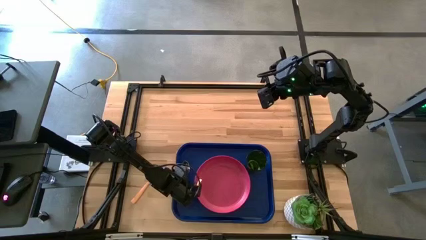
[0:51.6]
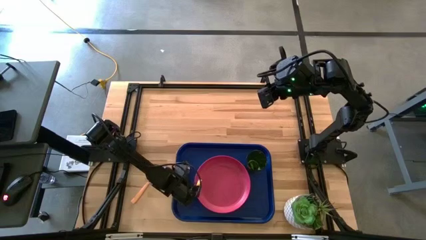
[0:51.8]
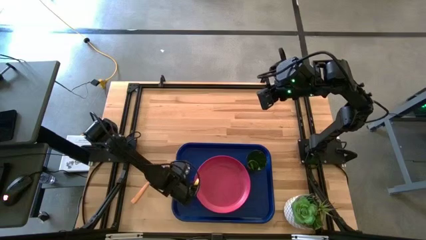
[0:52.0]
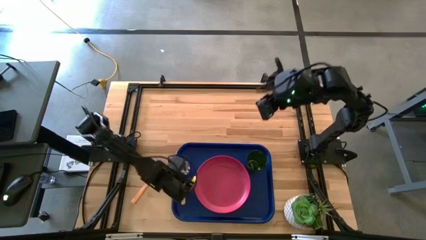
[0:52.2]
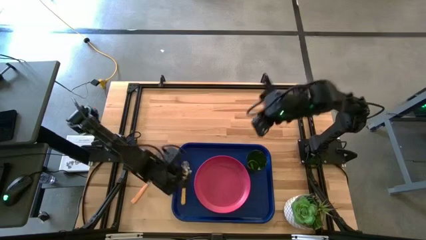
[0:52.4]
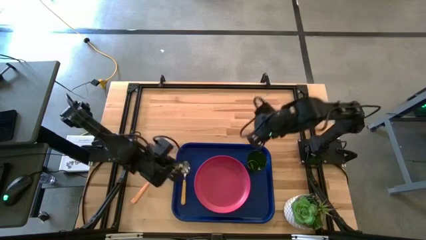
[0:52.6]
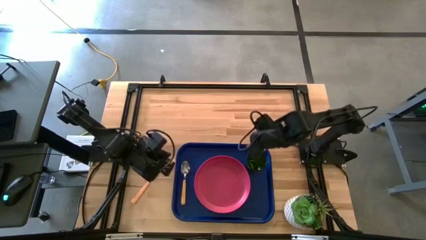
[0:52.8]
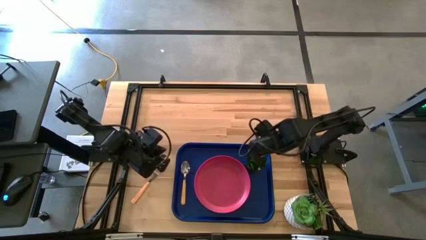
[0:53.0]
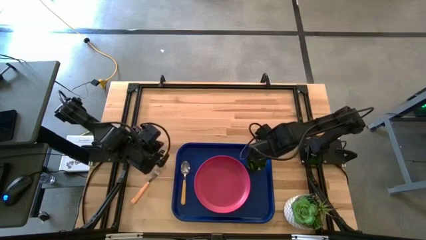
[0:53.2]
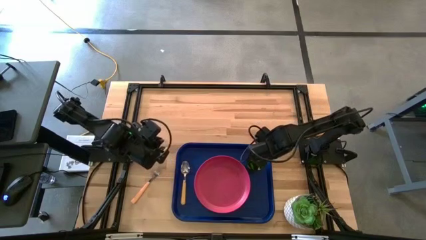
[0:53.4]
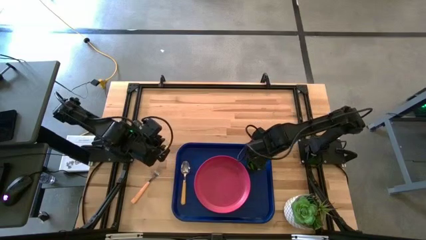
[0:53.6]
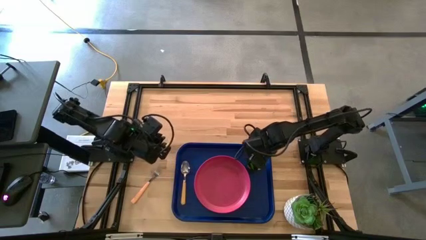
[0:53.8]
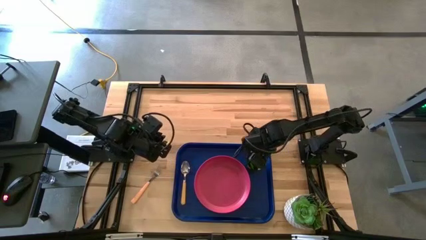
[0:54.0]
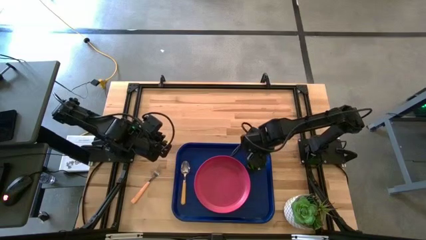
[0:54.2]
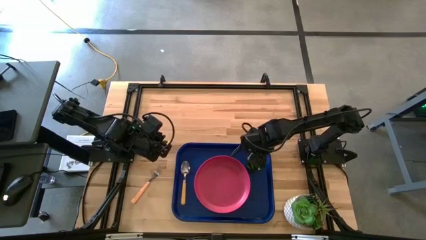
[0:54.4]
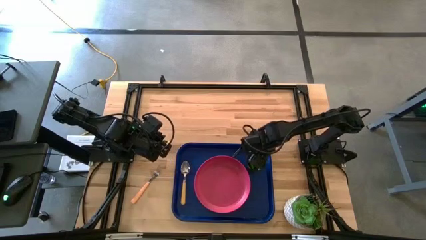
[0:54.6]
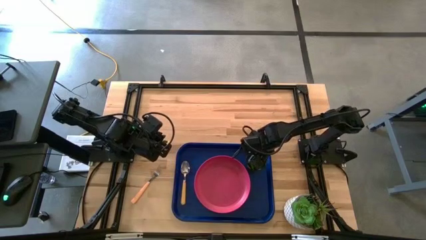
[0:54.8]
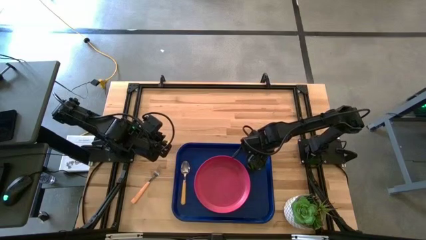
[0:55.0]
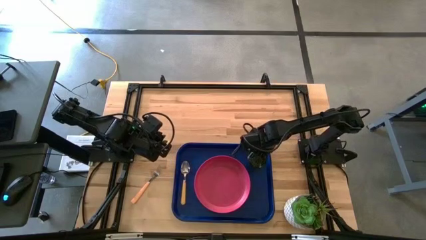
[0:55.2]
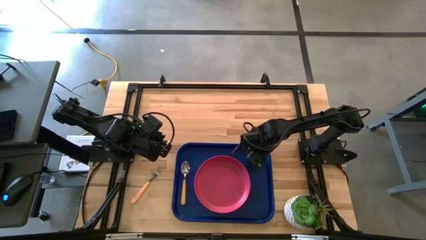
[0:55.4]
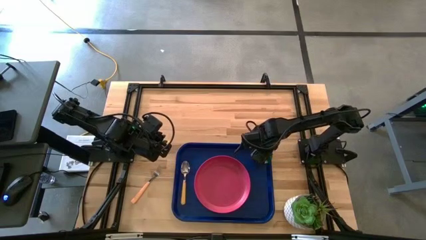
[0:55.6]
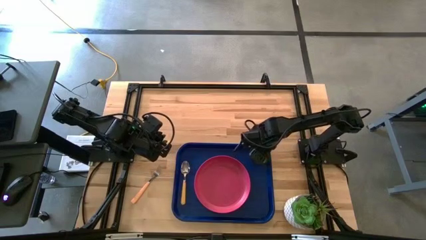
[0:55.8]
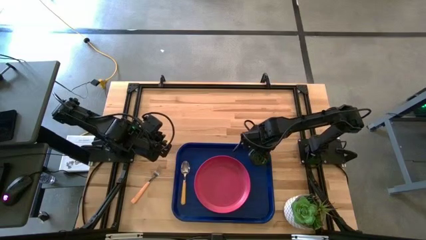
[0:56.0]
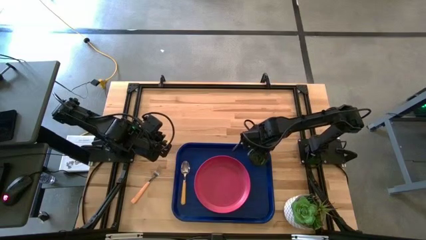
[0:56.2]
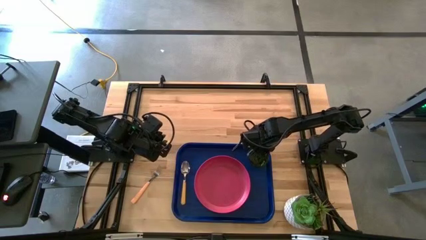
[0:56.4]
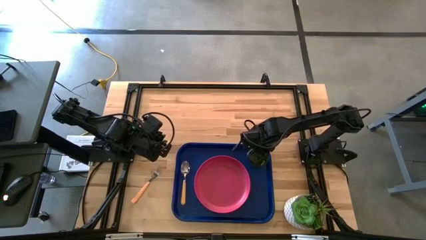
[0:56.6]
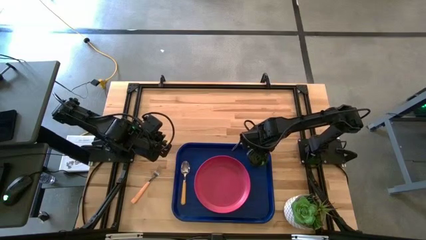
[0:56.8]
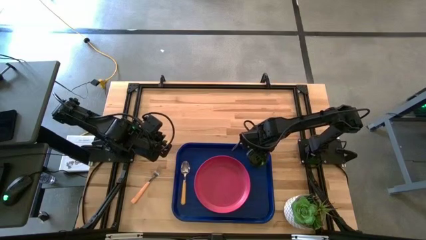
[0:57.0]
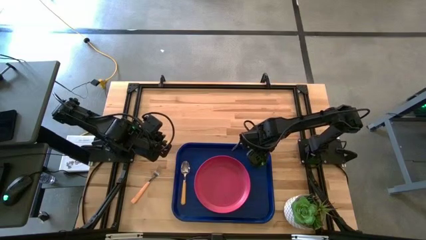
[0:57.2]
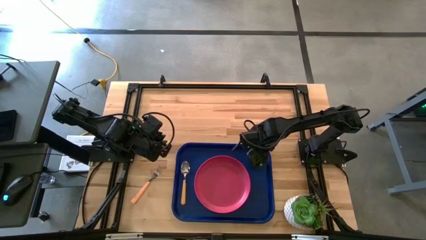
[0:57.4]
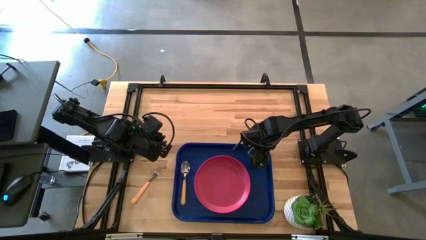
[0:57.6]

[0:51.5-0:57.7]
Task: Pick and place plate/cup/fork/spoon on tray
Adjust the green cup on the blue tray

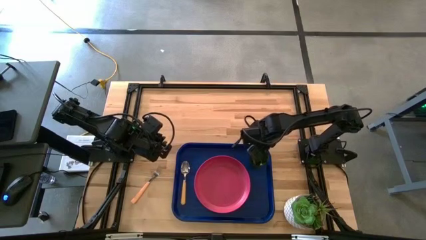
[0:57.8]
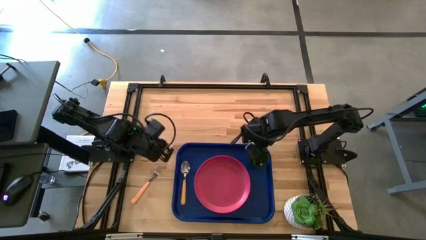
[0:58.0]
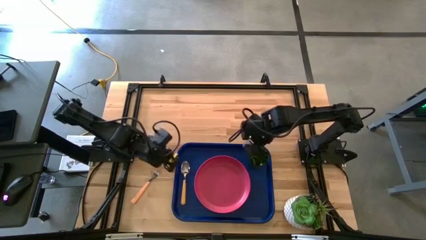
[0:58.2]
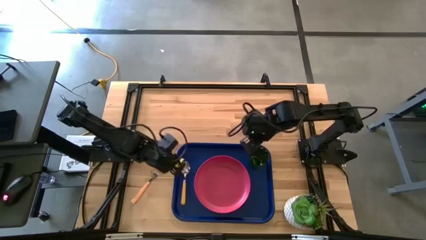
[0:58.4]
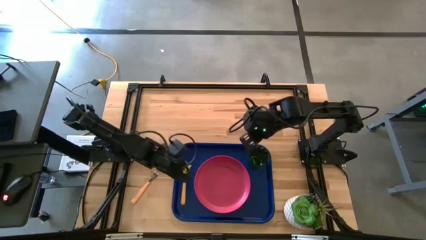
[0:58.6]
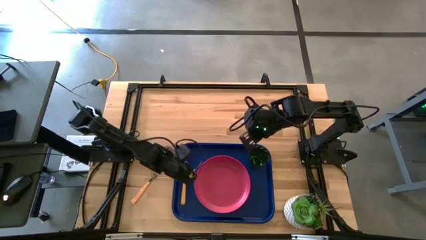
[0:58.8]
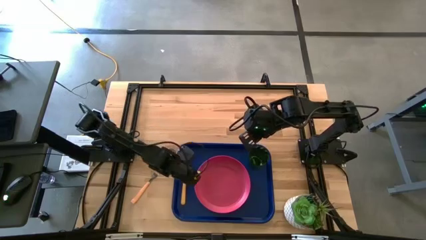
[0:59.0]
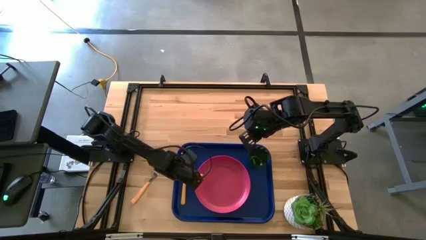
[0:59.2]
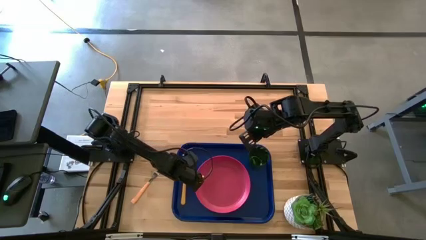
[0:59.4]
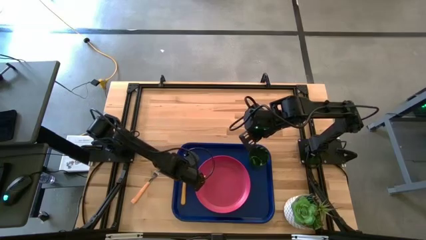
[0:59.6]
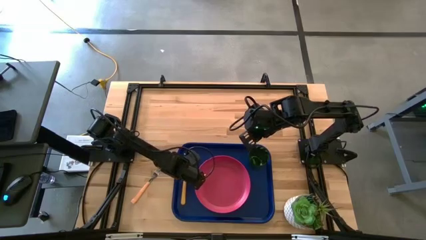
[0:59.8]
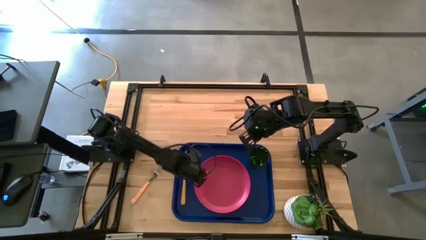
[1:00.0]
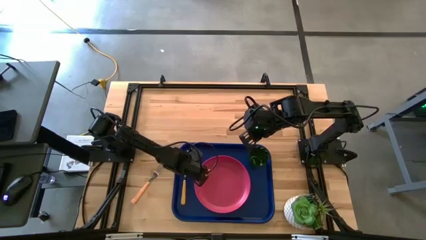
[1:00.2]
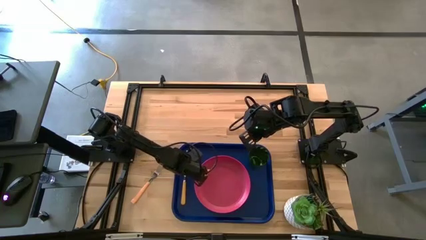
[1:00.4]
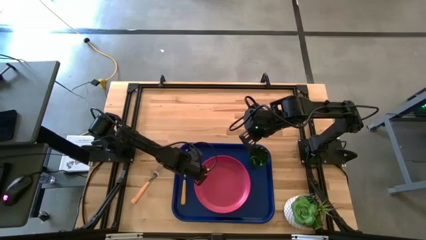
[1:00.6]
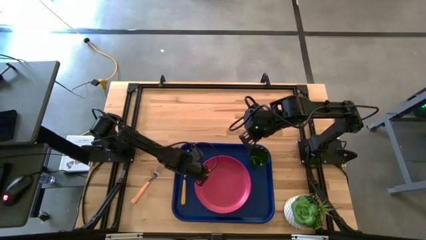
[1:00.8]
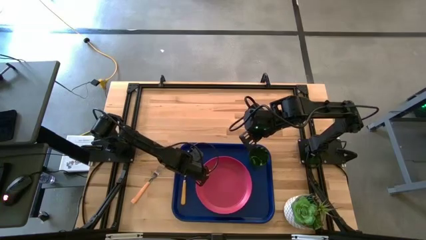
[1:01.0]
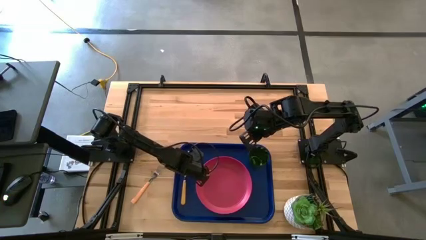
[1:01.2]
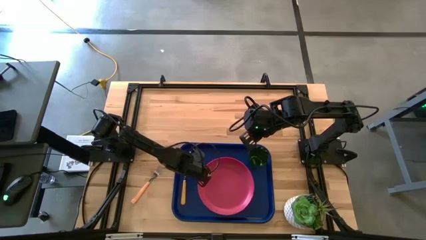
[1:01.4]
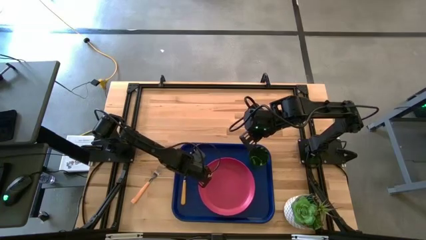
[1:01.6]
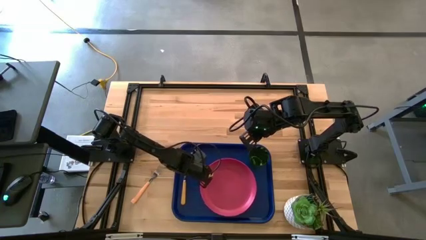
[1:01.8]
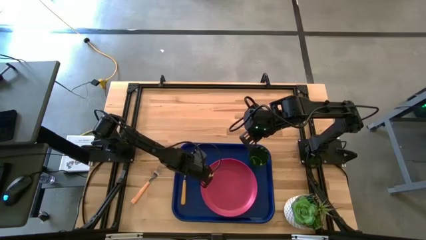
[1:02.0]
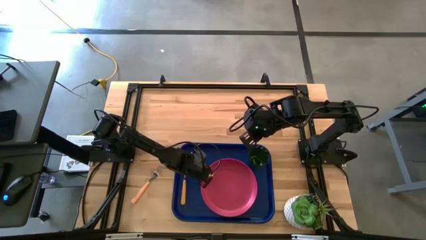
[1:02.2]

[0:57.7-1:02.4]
Adjust the pink plate on the pink tray

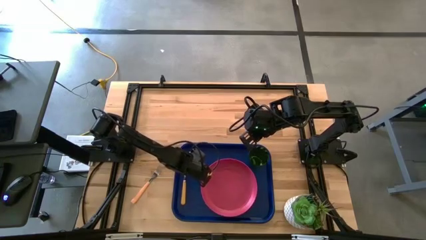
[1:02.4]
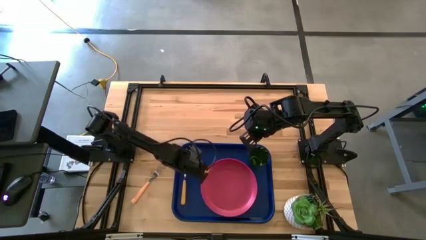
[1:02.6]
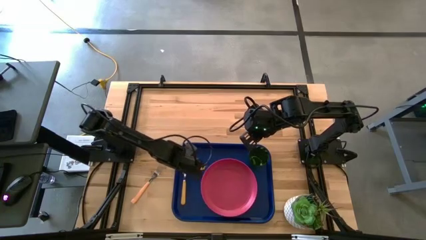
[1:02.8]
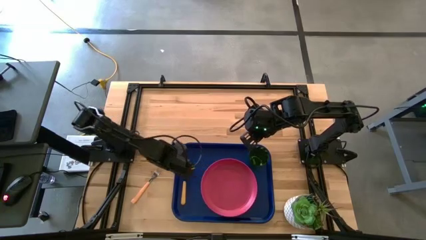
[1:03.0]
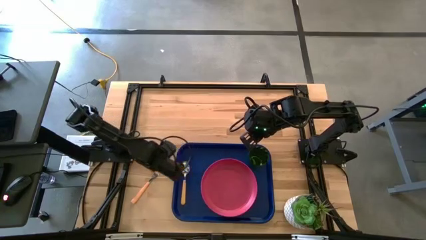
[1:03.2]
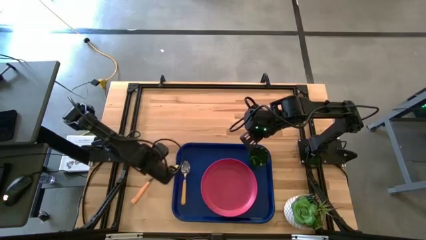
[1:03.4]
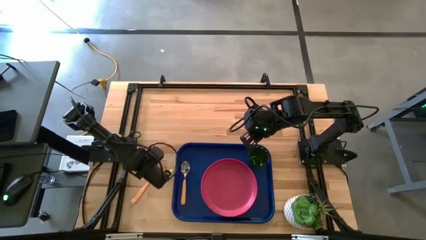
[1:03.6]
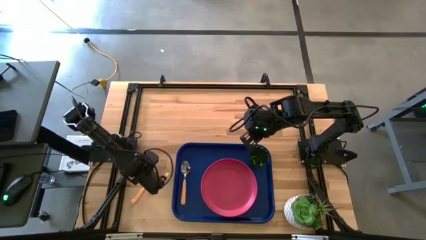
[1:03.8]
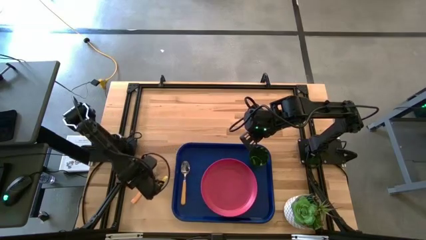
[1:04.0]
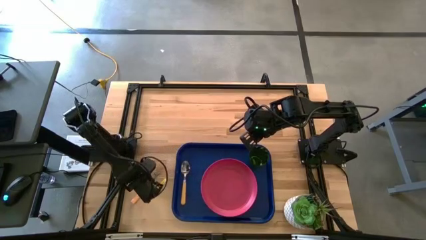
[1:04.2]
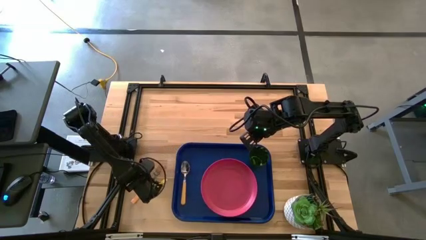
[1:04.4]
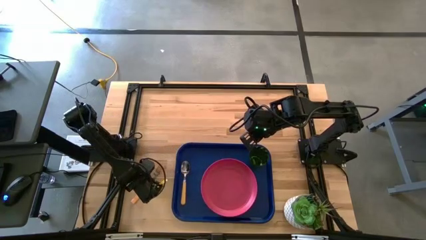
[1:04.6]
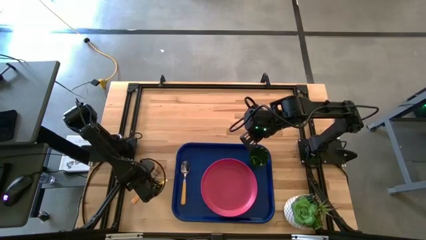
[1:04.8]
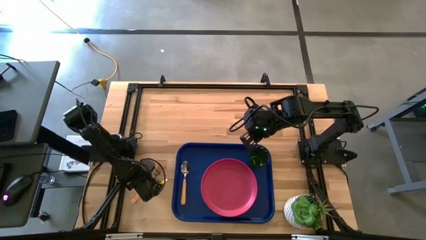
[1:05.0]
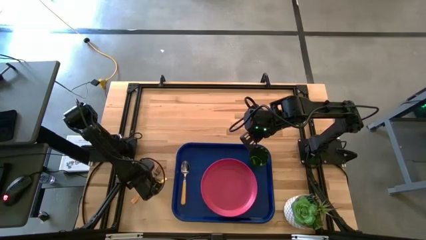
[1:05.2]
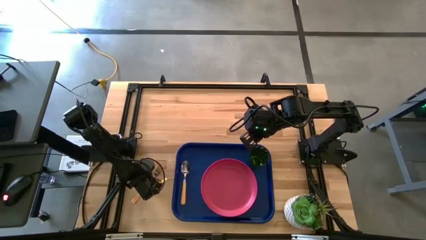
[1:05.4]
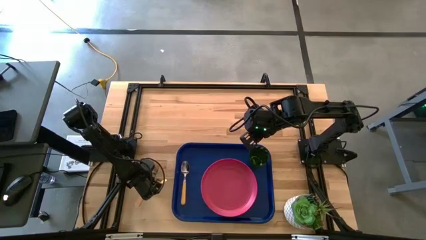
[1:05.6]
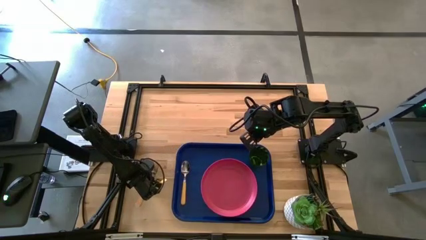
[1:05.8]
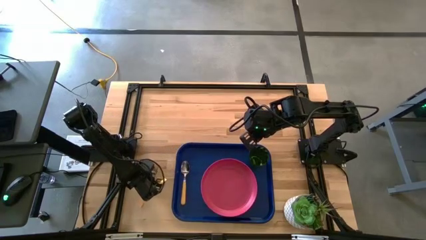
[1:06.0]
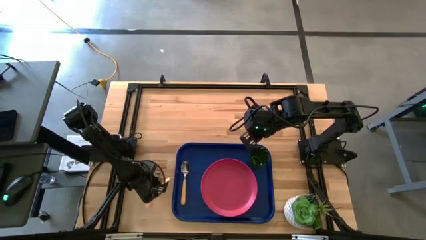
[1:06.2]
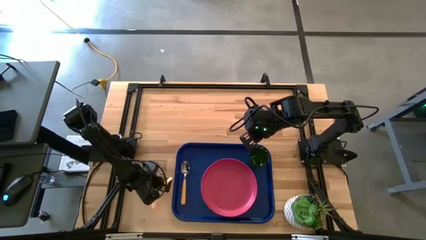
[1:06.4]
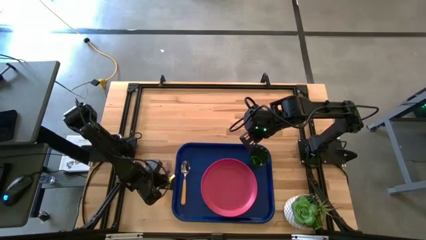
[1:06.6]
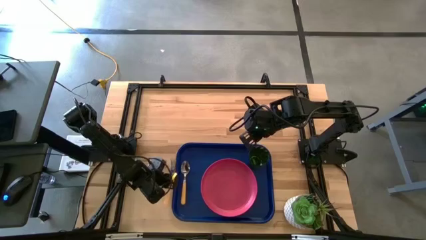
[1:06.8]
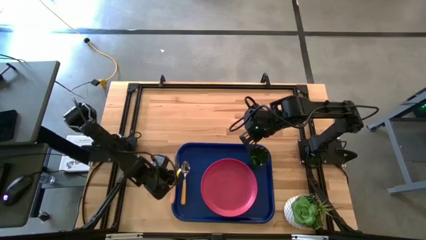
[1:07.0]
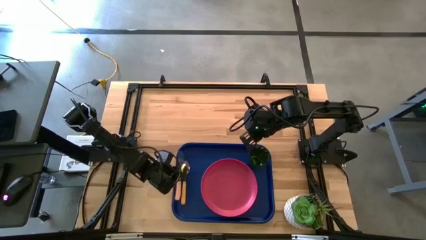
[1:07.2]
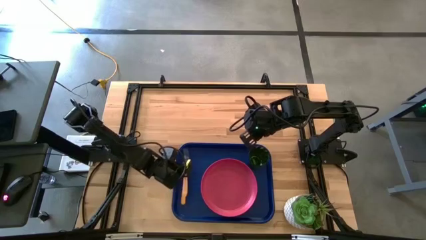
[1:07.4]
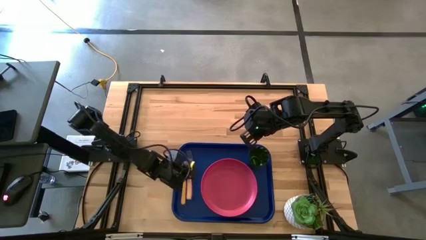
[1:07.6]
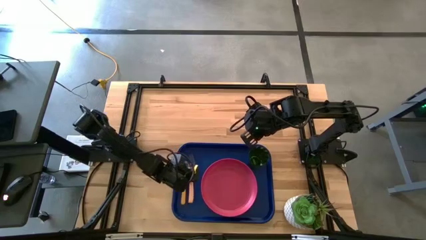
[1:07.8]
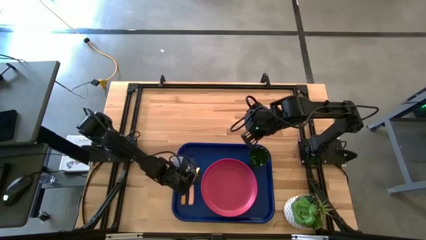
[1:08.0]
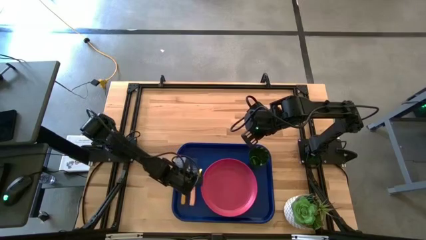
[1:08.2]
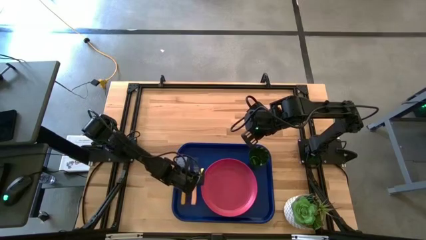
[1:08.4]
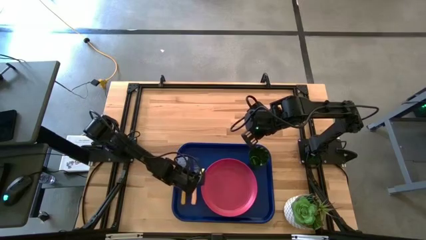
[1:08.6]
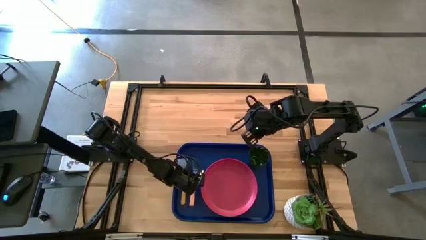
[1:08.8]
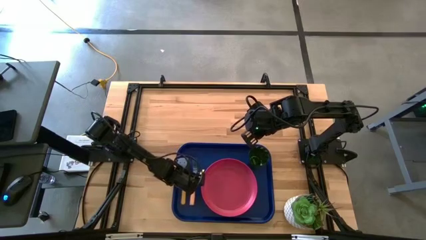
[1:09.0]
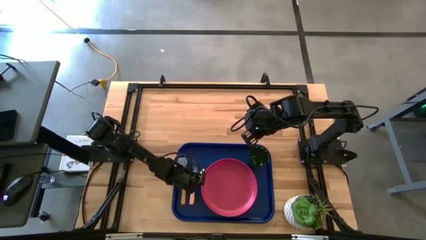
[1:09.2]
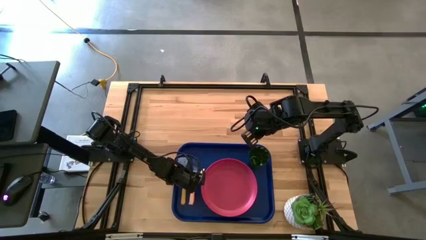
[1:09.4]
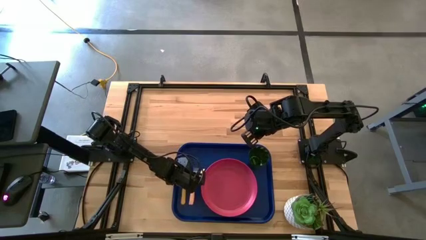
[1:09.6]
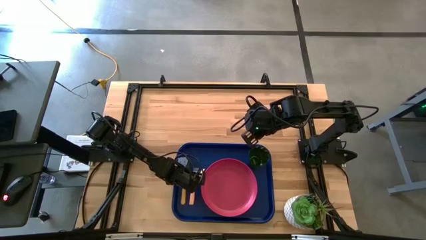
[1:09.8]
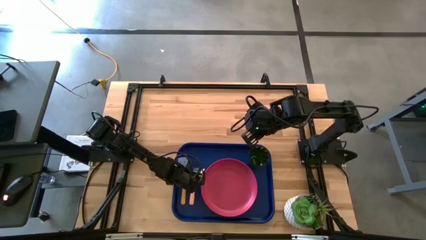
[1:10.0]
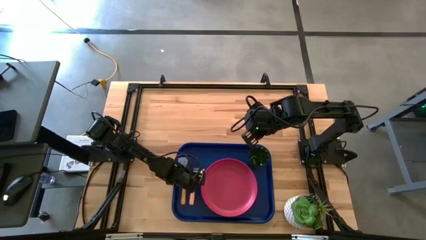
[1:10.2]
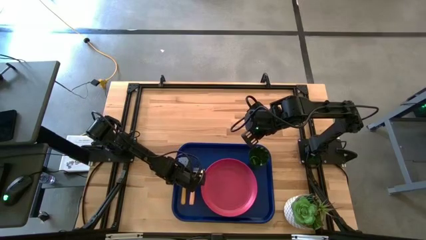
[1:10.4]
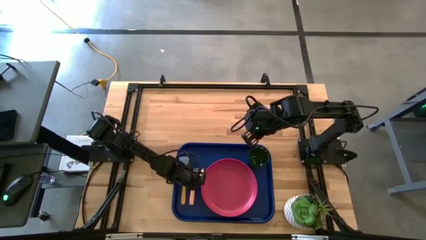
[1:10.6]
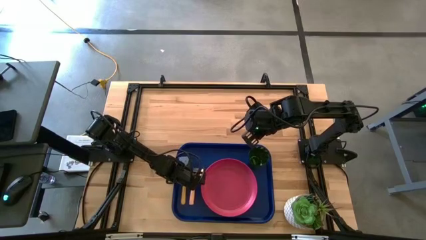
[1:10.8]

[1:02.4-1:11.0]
Put the yellow fork on the serving tray between the yellow spoon and pink plate
